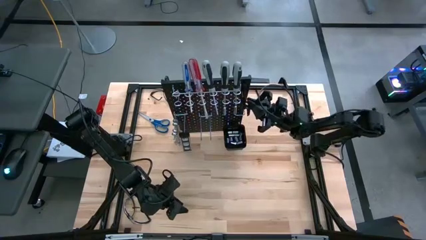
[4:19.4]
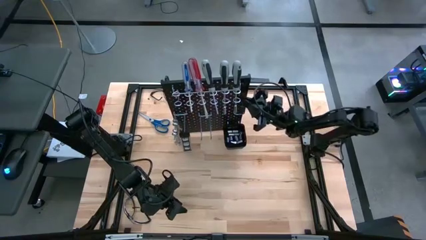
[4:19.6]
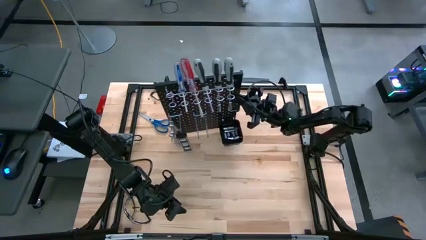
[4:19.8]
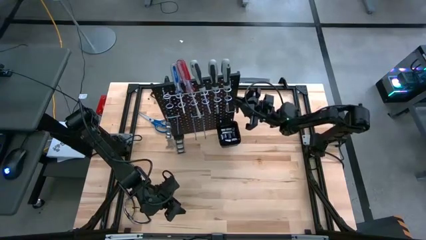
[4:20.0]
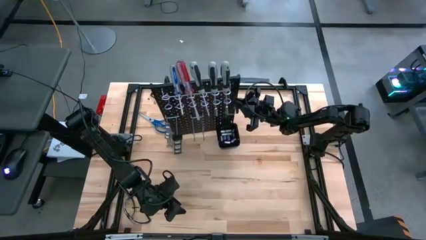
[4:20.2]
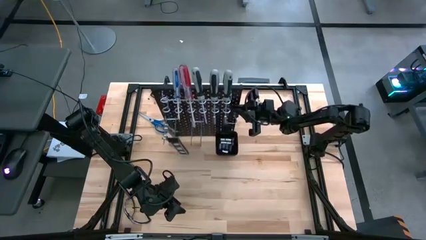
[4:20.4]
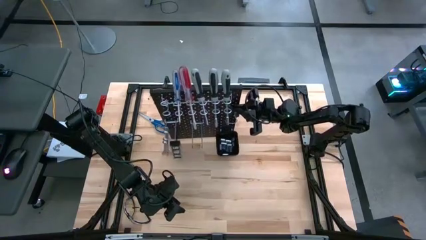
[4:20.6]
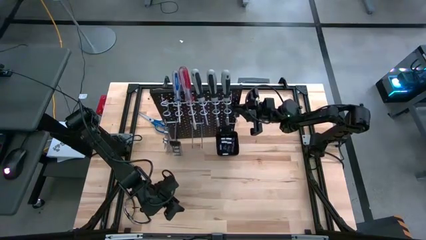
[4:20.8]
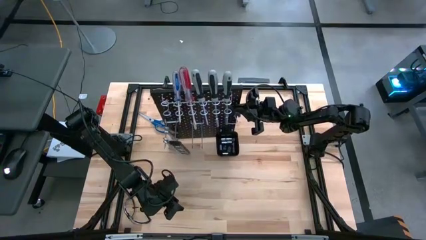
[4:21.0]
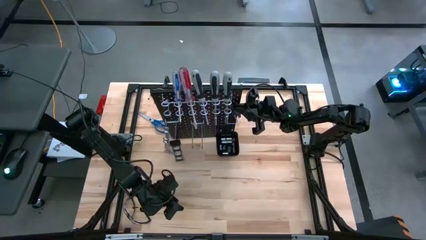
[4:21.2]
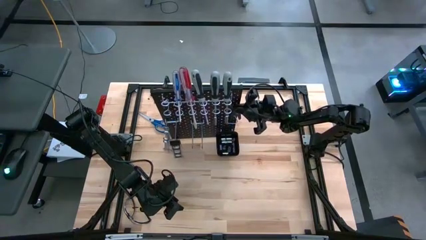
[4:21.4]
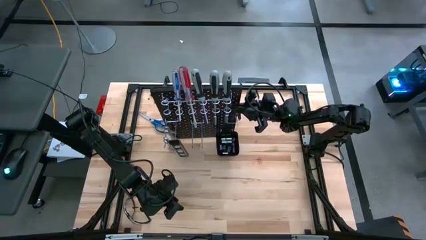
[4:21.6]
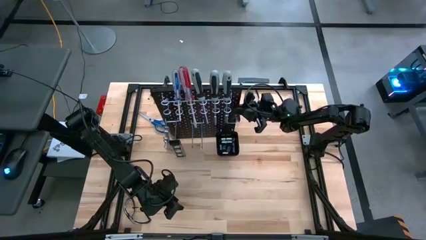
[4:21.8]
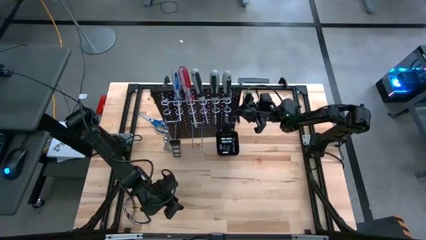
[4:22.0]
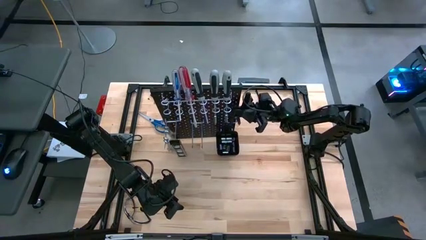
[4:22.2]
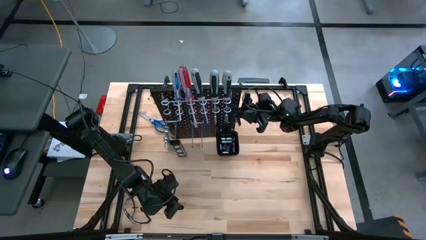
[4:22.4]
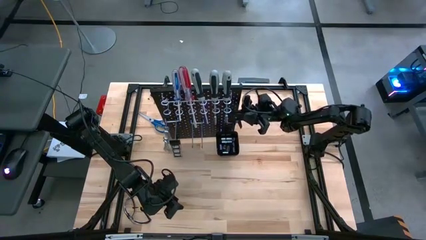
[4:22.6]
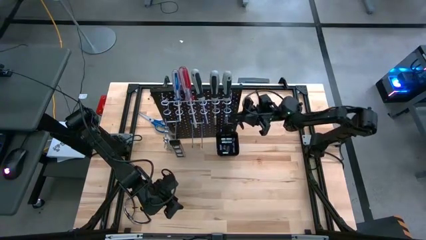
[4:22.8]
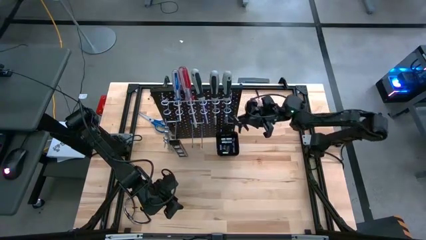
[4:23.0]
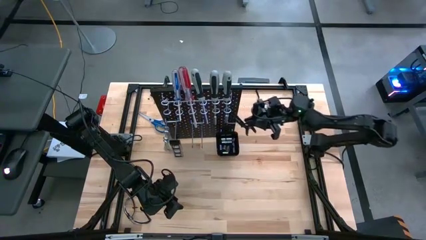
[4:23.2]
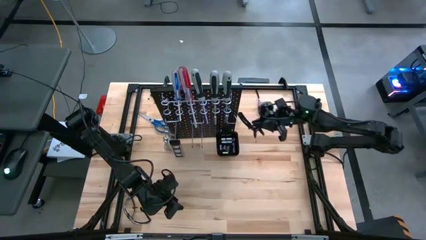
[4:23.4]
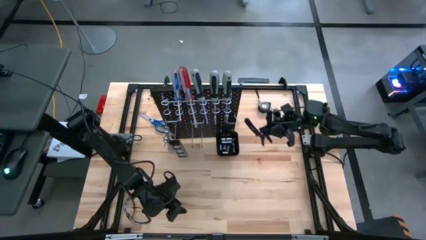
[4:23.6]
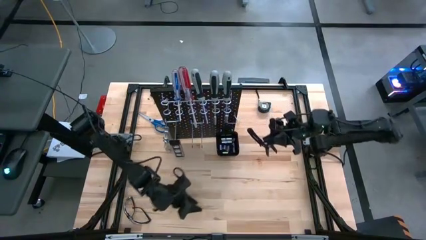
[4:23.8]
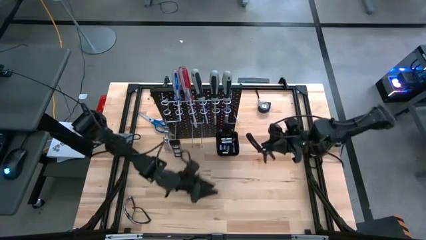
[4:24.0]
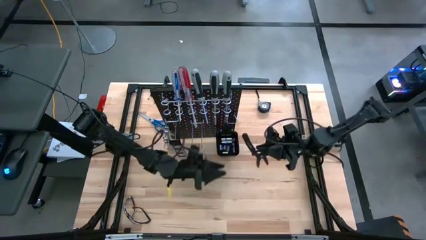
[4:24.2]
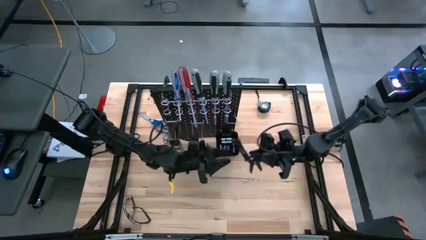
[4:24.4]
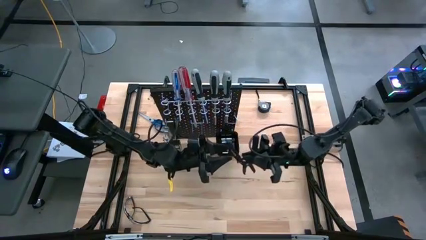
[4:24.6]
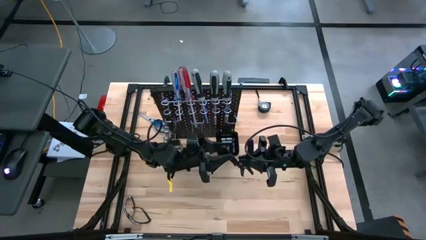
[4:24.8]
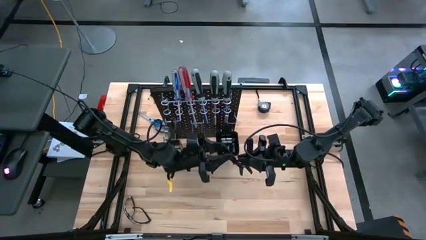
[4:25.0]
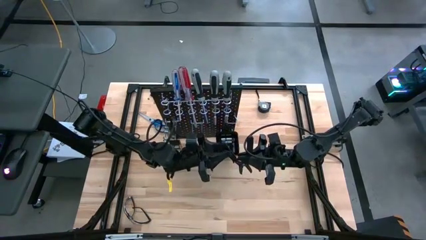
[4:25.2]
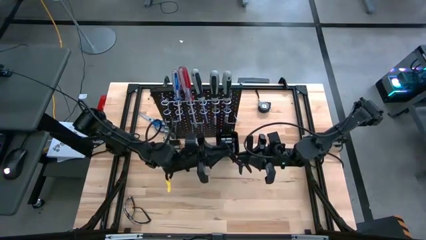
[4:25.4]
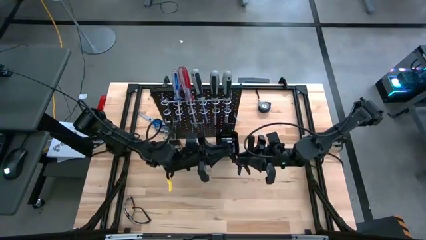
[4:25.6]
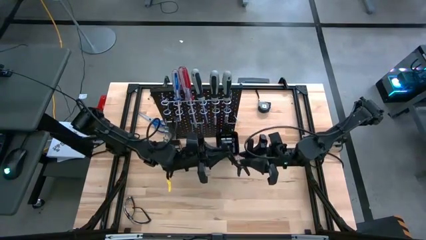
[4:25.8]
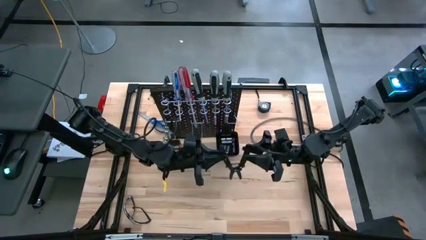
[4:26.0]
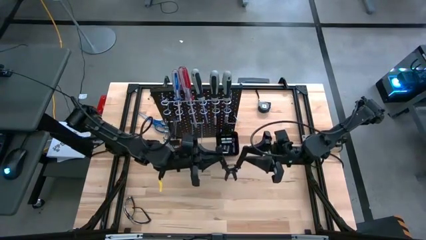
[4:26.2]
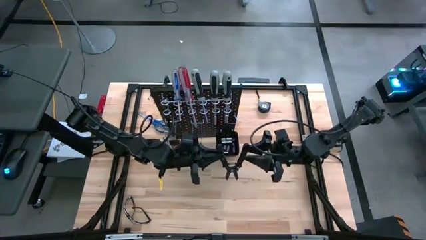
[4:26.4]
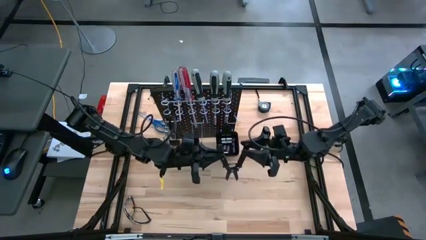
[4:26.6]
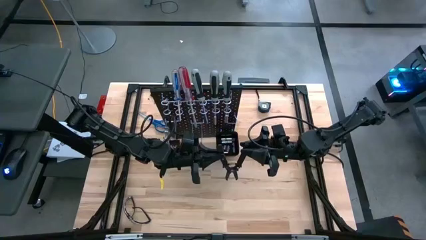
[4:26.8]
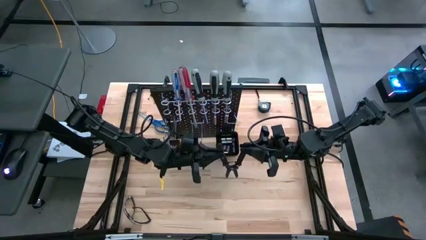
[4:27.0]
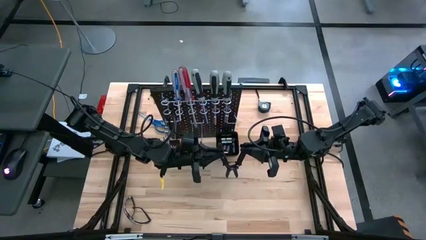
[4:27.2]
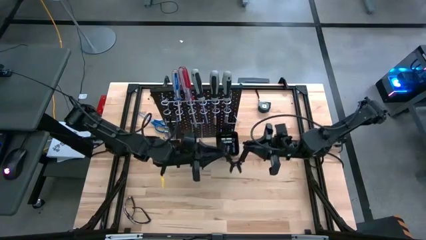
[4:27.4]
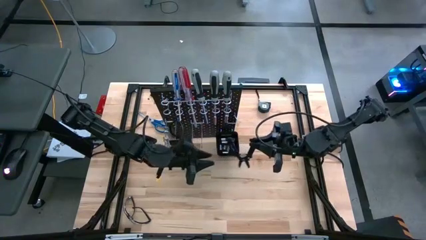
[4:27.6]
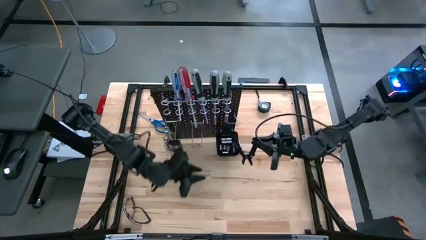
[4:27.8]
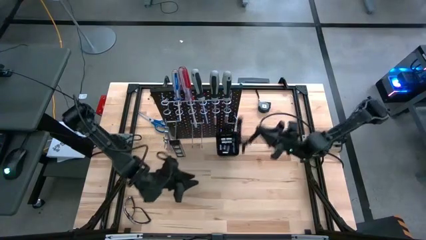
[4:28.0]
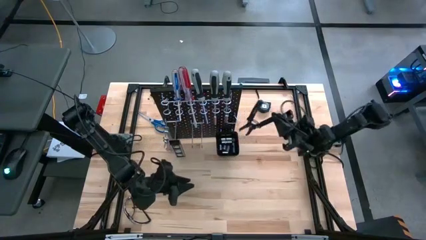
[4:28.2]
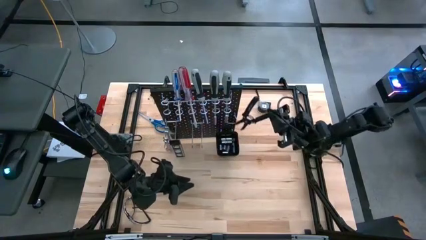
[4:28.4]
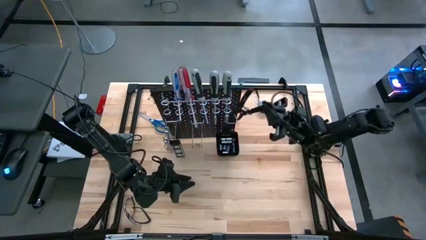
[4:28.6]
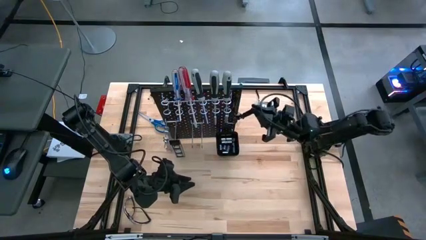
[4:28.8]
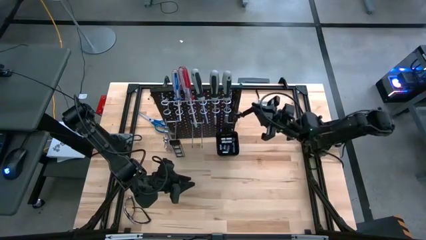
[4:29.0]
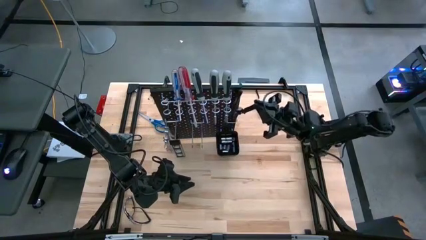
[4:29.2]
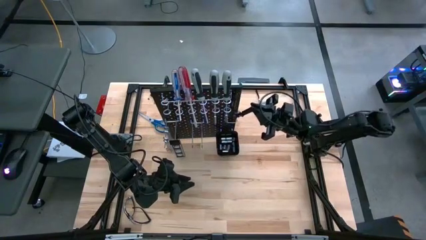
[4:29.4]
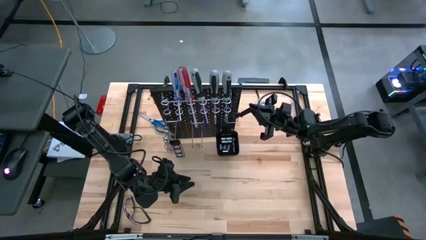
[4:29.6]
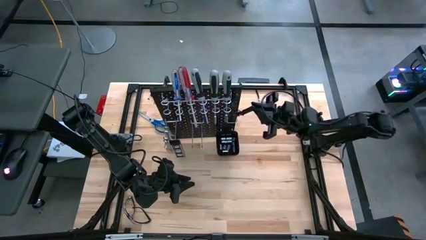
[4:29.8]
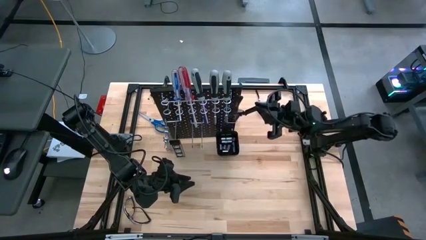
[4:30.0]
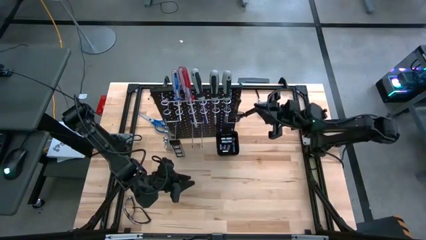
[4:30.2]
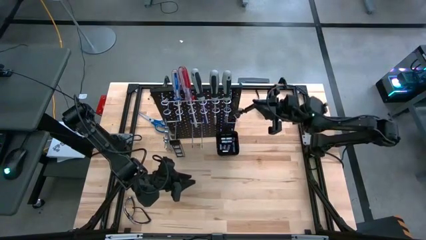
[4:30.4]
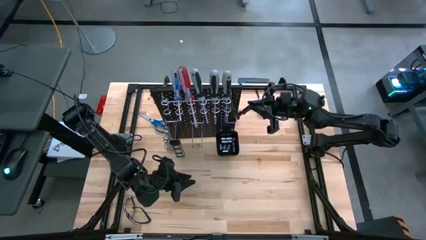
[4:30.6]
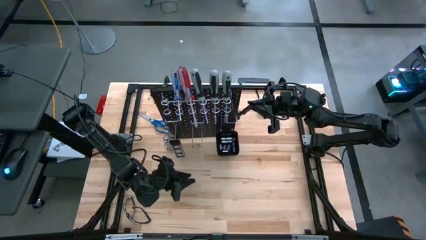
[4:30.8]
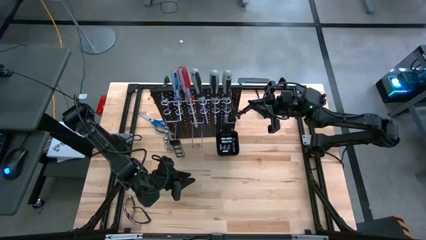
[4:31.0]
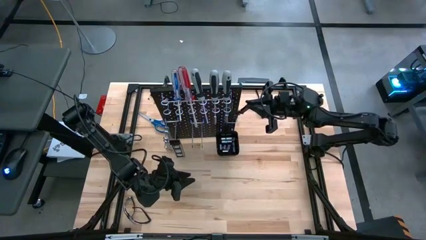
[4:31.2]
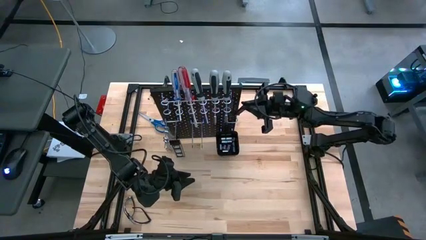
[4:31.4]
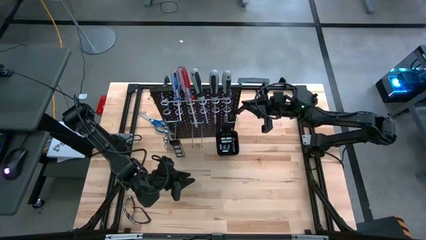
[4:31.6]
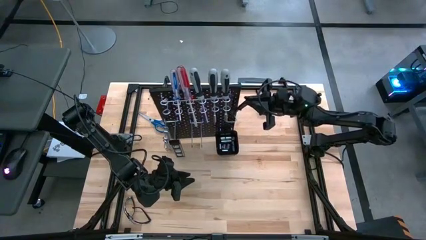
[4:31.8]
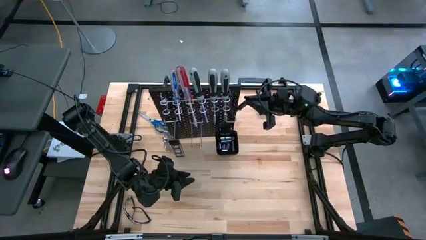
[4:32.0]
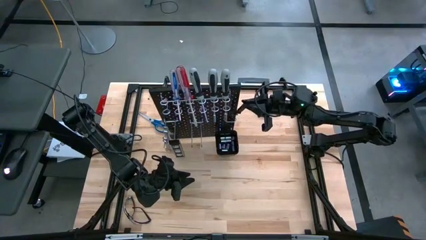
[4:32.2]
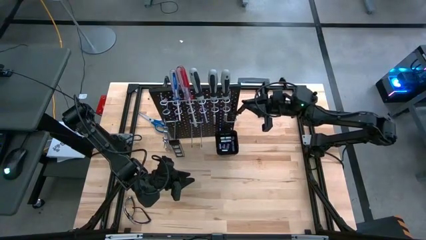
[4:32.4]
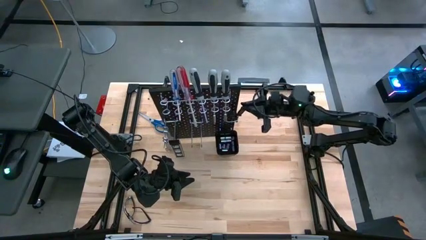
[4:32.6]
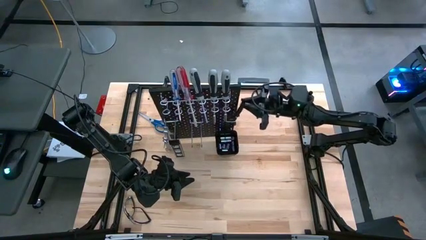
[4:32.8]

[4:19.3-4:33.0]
Task: Hang tools onto peg board
Hang the black pliers on the pegboard

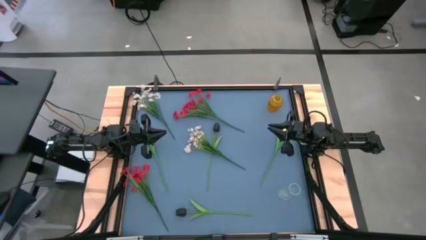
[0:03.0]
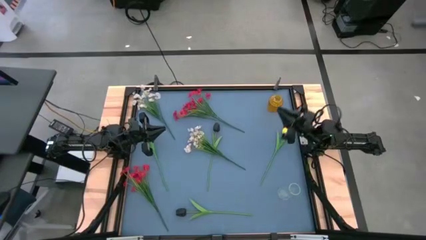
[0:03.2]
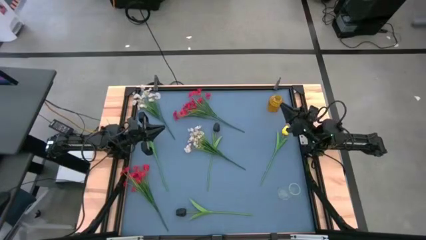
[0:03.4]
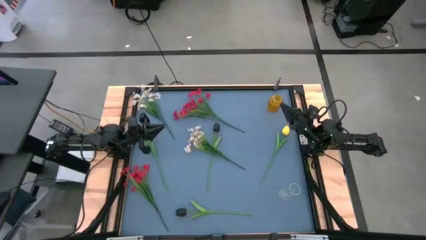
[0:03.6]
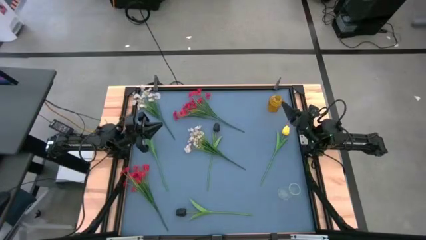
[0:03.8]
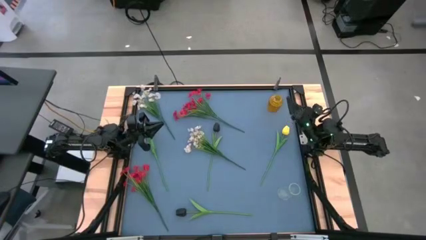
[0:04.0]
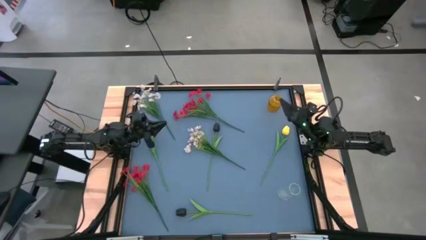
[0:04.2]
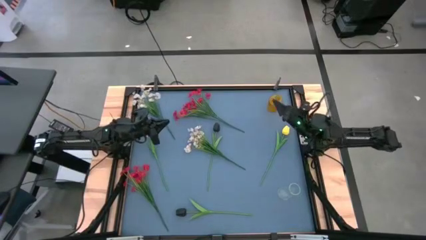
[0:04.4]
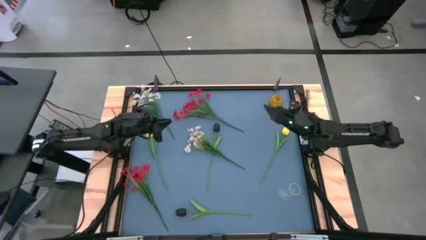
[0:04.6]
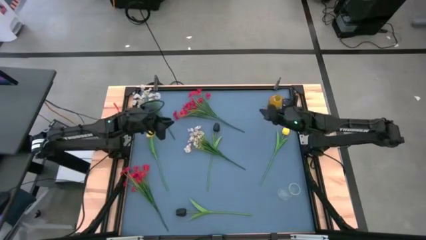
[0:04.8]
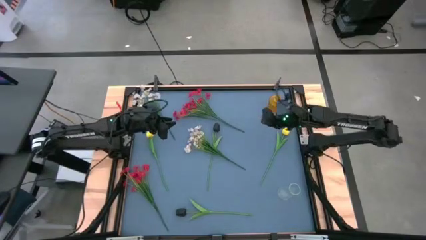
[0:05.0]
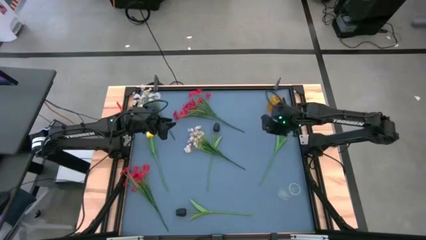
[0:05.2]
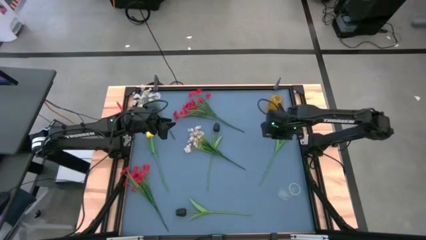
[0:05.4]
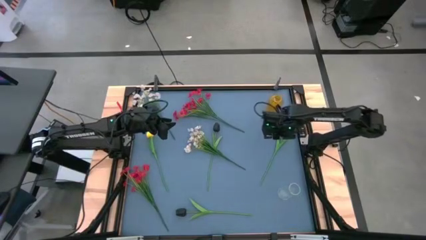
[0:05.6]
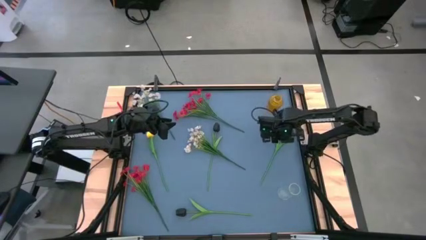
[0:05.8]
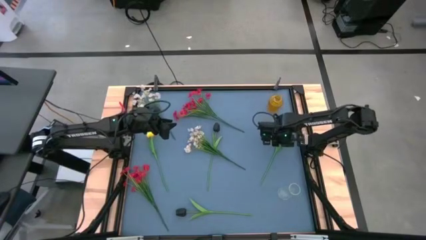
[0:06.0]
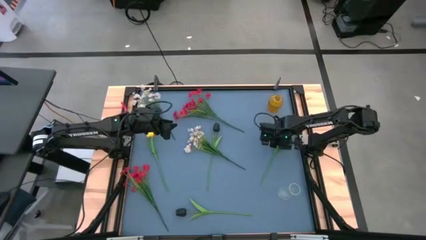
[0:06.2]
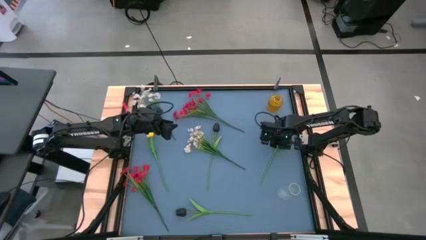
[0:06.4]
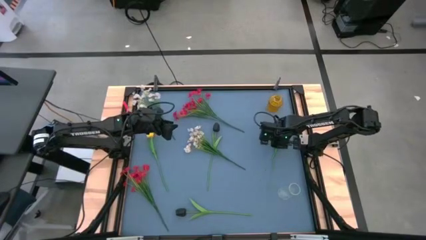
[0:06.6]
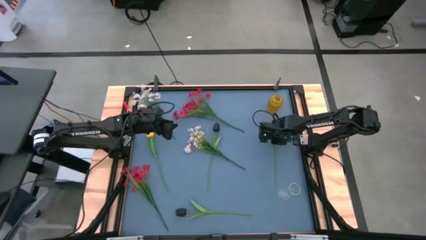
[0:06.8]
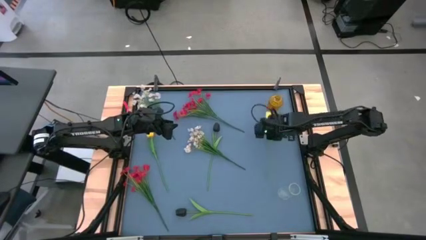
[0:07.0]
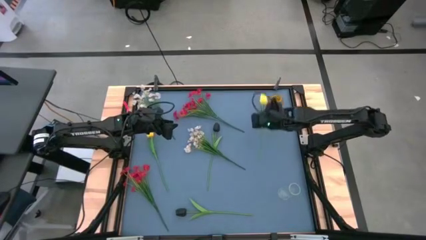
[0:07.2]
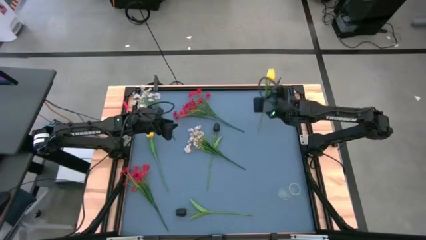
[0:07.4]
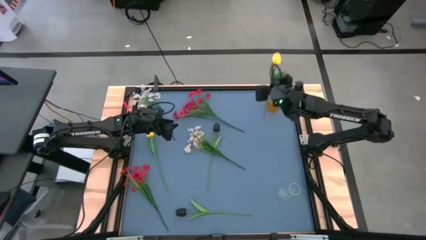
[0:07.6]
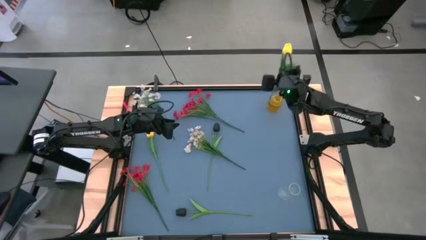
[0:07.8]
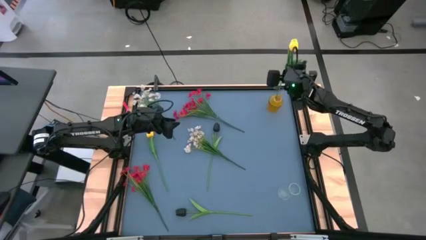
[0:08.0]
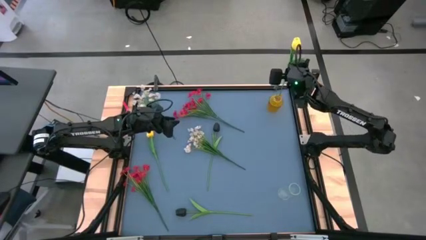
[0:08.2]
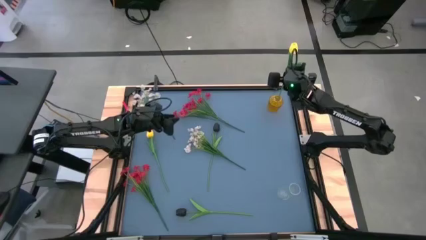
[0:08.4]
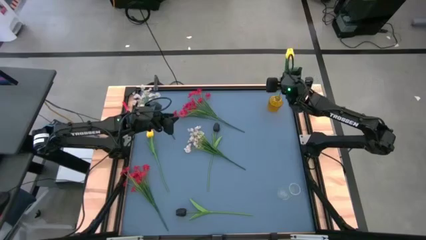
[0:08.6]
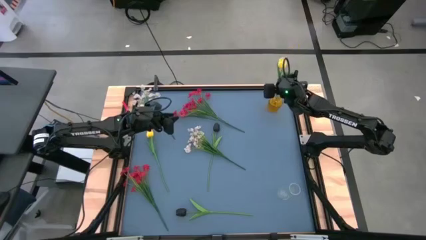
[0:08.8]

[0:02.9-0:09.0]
Task: Sort flowers into vase by color
Put the right yellow flower into the yellow vase
